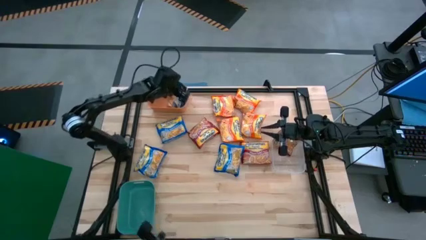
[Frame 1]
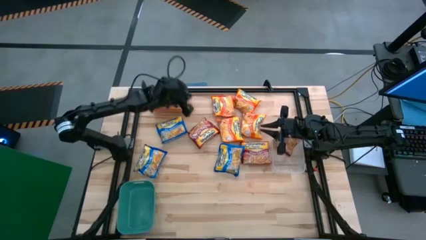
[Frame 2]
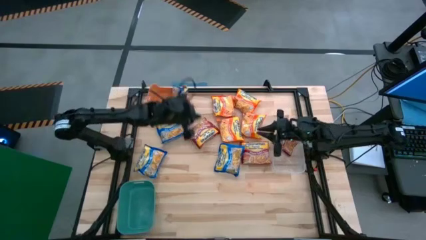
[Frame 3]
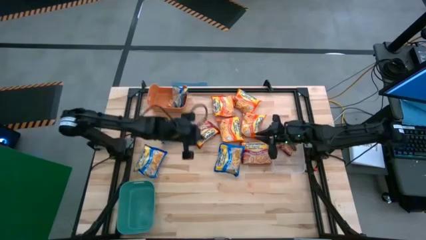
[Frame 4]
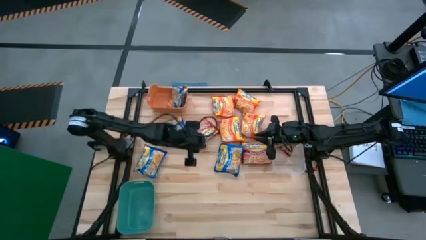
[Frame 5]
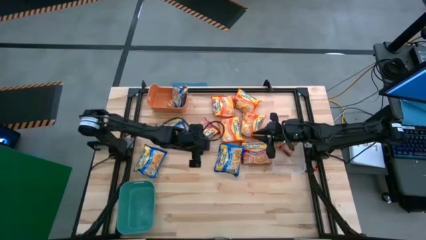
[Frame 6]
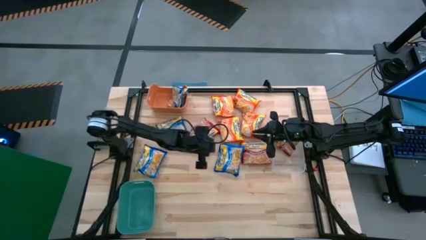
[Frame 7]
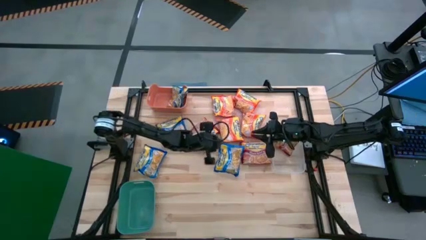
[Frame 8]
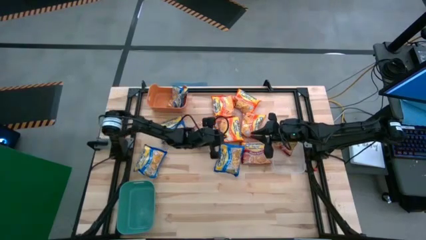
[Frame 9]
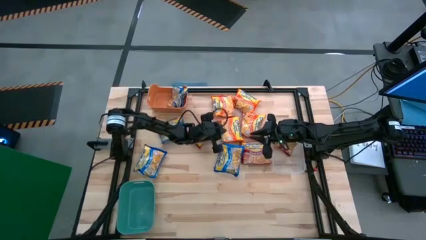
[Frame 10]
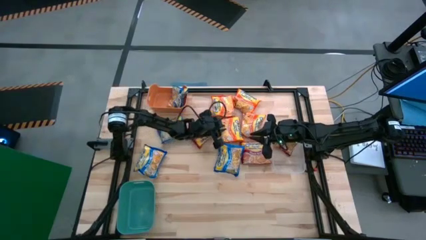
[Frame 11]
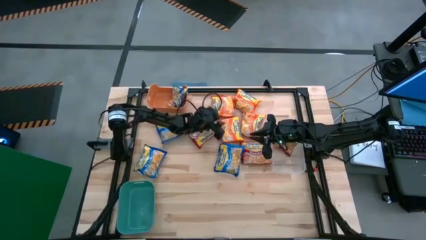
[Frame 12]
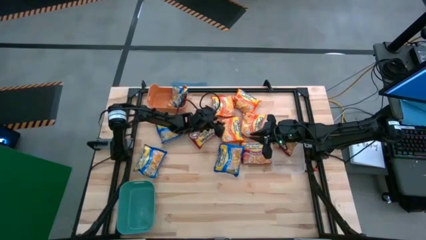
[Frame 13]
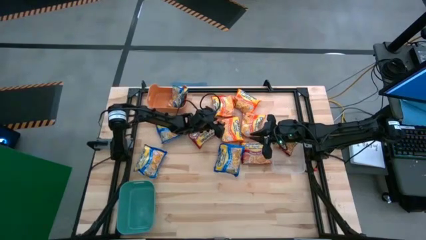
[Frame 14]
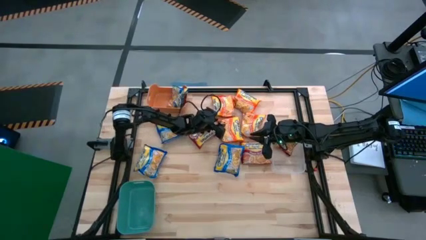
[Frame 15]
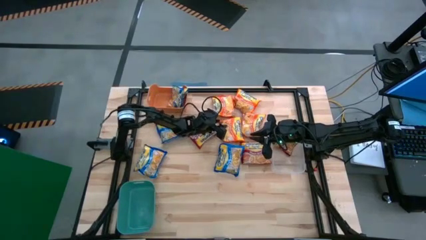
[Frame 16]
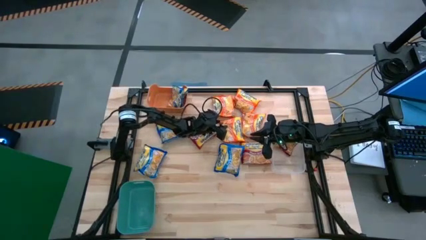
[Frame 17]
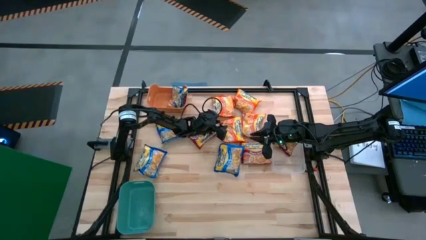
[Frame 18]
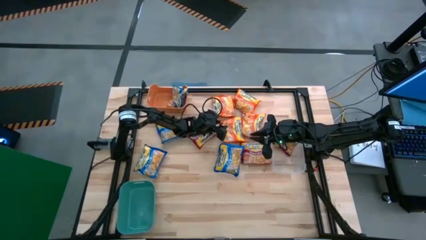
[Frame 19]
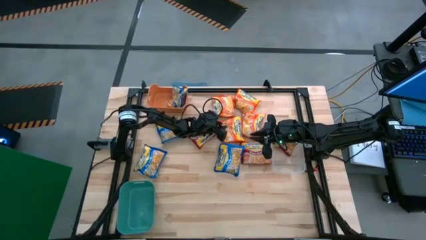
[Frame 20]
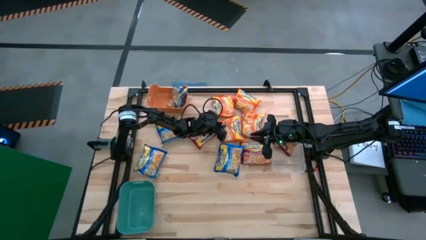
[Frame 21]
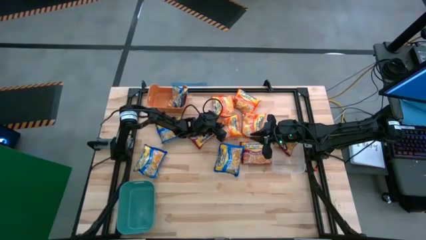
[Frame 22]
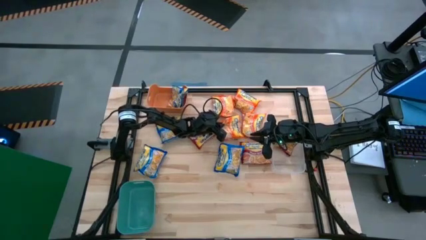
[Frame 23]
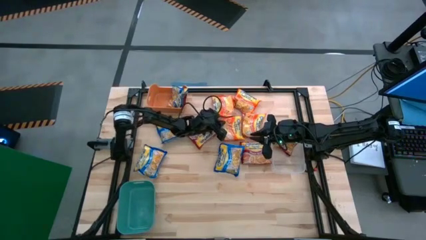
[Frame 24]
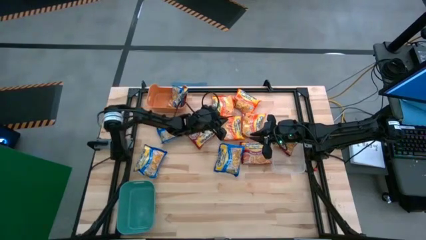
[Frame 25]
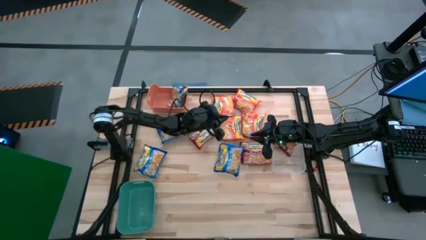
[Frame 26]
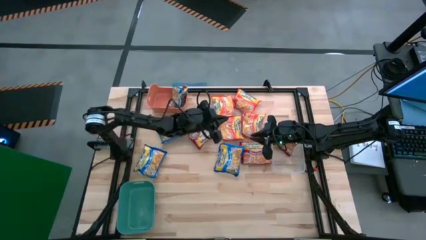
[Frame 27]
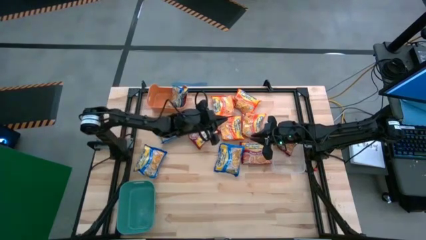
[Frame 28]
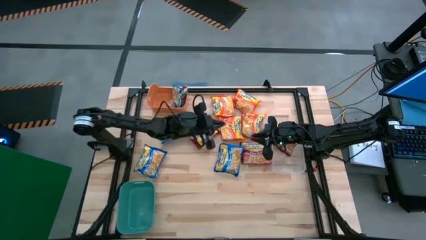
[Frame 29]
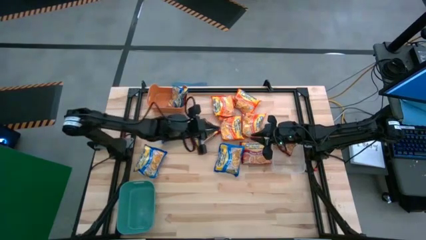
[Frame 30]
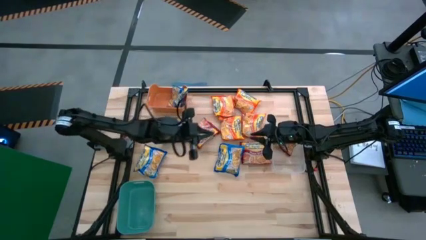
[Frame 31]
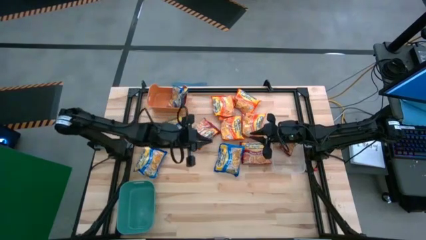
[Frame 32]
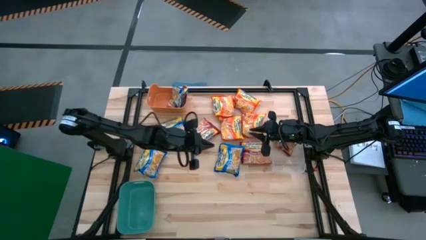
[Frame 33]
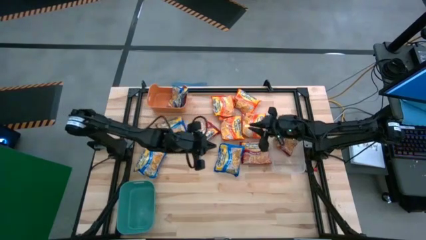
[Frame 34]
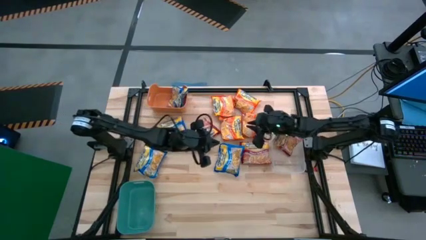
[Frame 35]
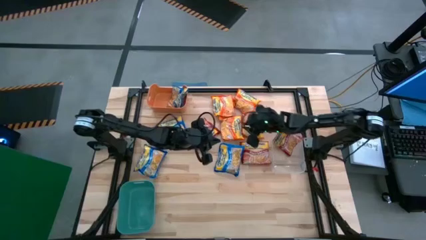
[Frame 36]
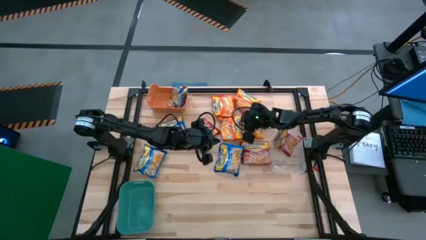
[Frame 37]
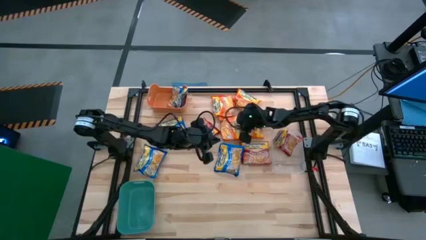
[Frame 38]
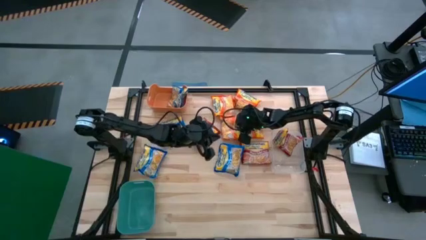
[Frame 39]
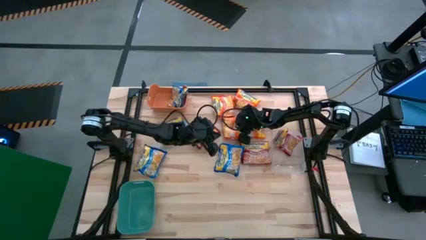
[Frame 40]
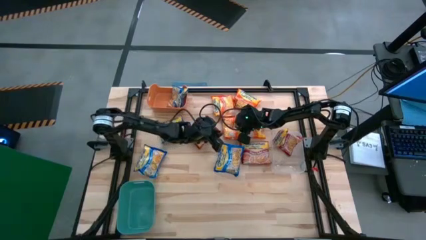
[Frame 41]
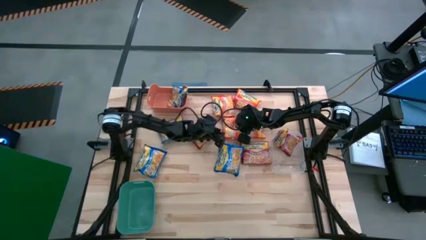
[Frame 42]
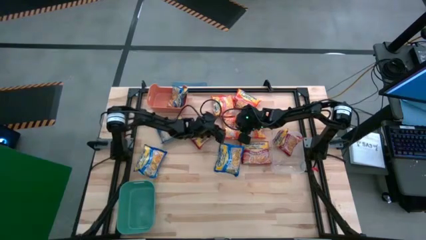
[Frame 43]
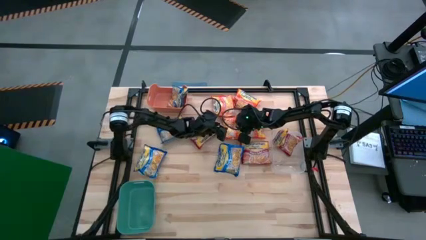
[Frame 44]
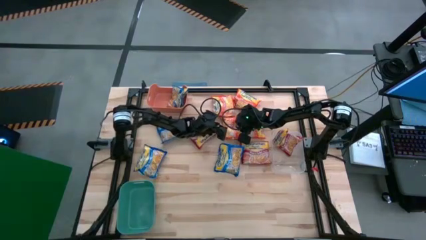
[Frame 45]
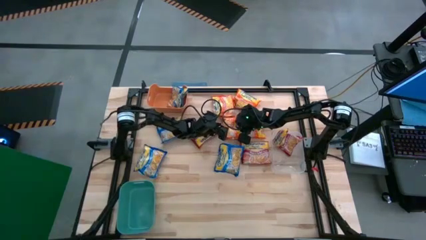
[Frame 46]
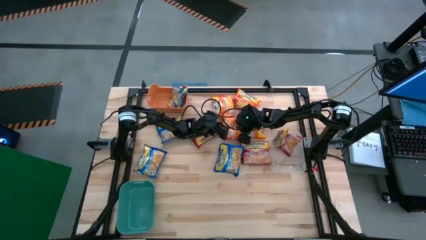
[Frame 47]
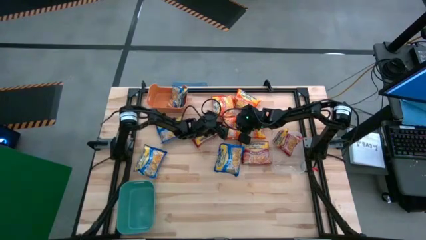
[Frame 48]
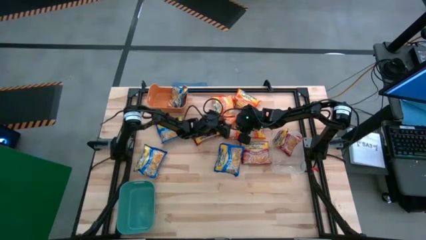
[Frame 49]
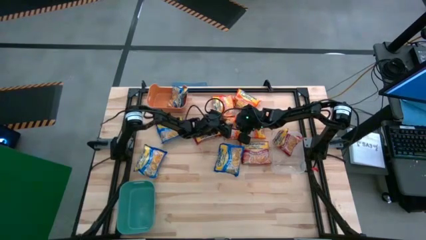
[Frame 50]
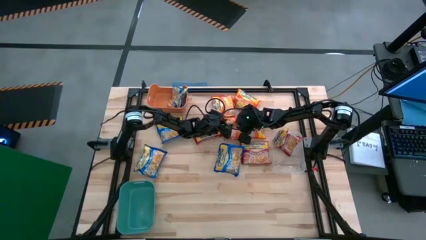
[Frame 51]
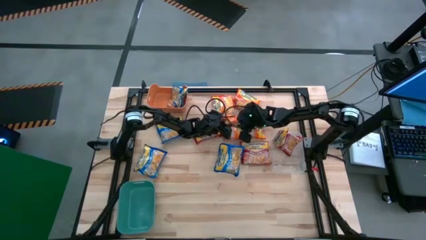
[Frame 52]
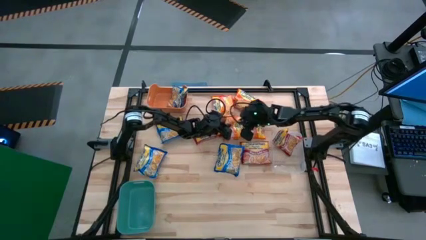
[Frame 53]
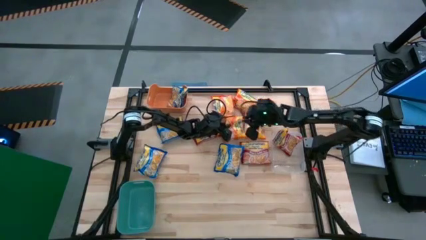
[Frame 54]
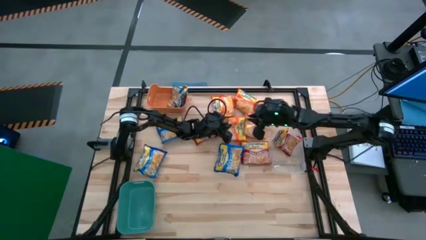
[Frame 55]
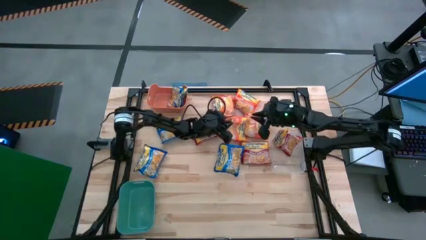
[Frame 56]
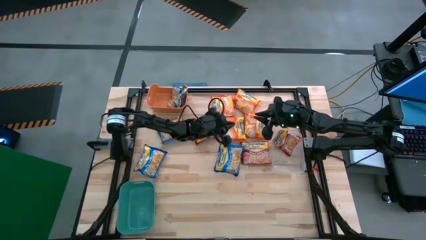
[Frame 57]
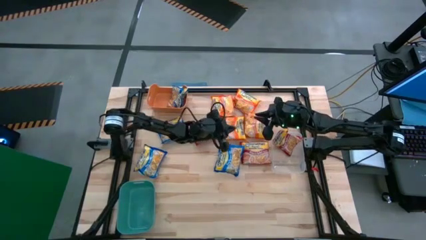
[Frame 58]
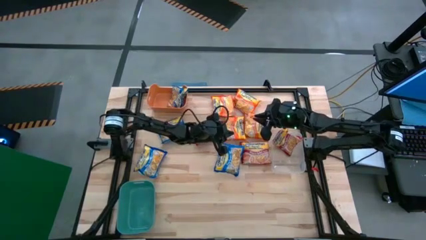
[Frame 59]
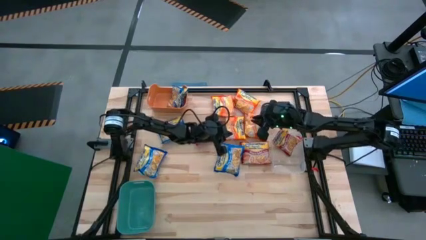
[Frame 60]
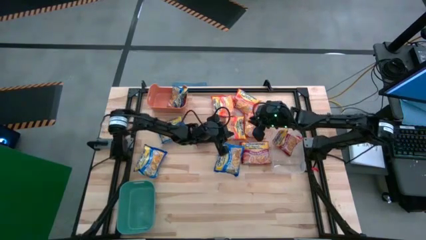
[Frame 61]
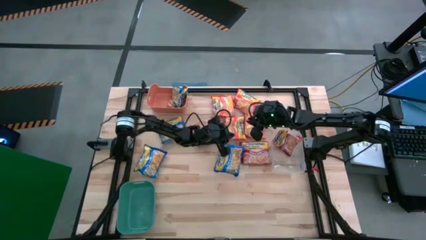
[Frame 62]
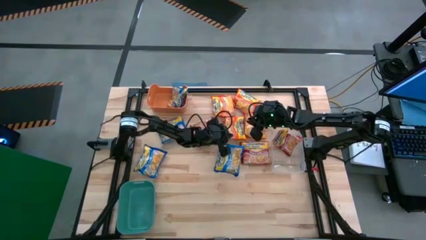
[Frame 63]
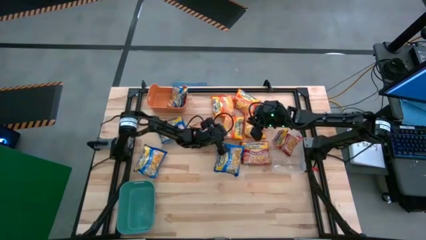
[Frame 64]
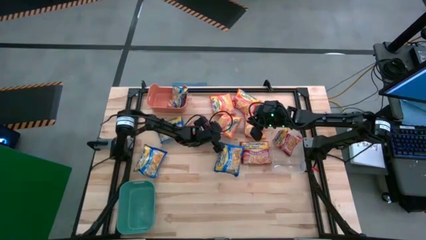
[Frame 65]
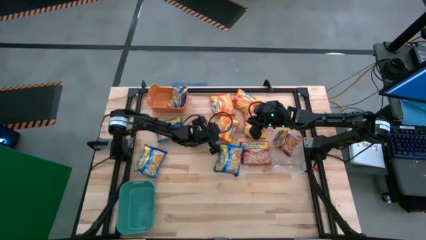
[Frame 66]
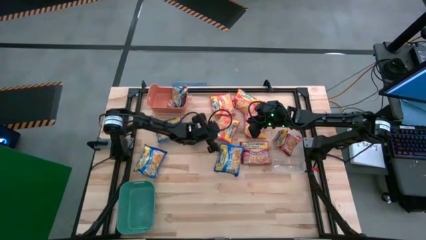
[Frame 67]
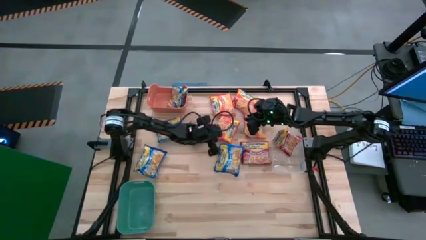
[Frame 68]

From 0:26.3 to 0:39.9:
Task: Sort Maruchan noodles
Put the orange noodle pack into the green bin

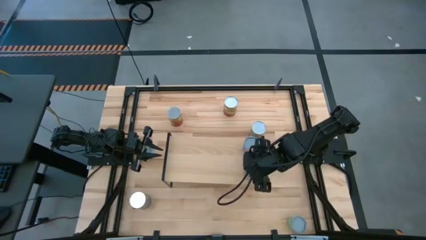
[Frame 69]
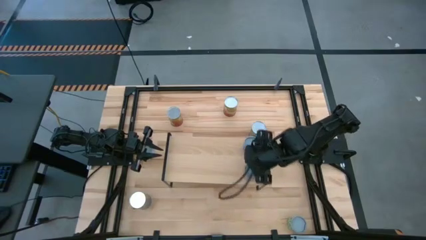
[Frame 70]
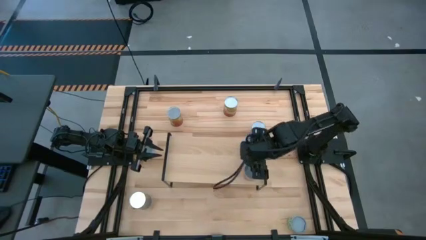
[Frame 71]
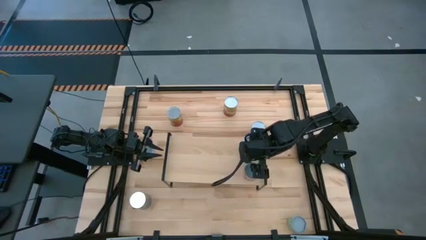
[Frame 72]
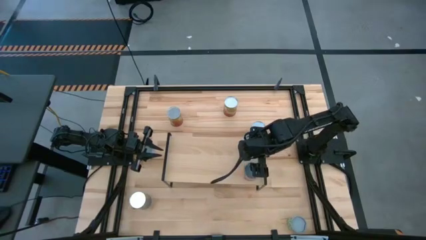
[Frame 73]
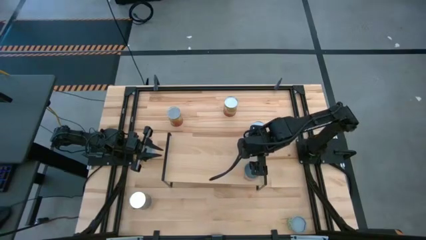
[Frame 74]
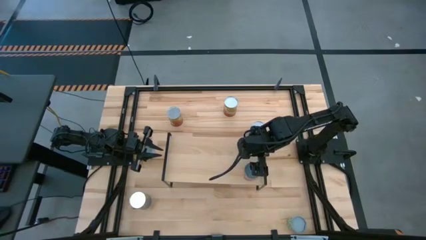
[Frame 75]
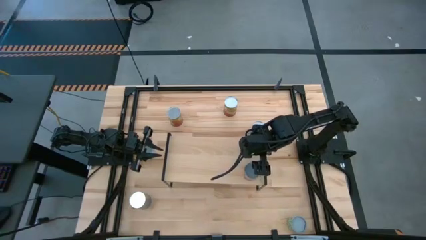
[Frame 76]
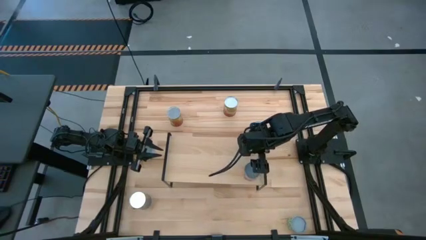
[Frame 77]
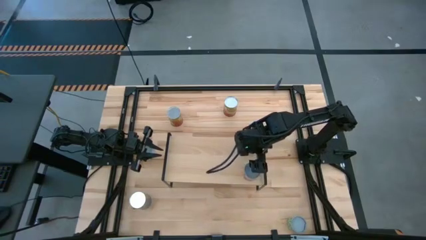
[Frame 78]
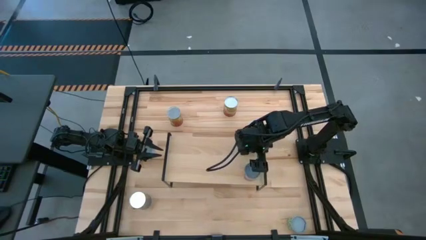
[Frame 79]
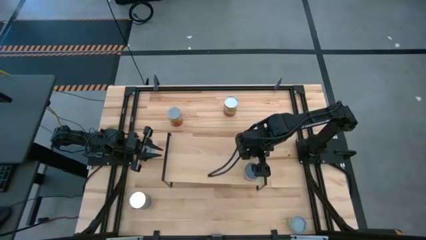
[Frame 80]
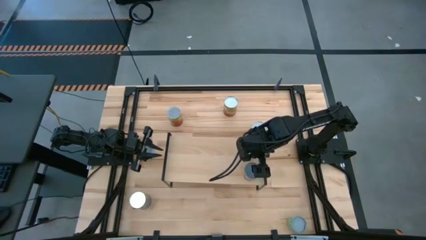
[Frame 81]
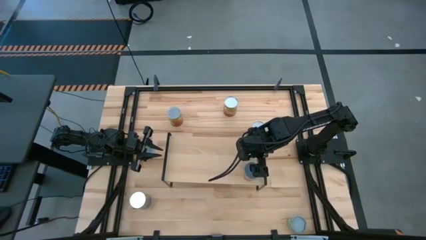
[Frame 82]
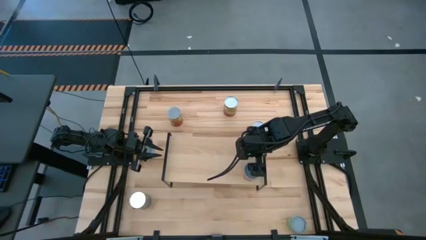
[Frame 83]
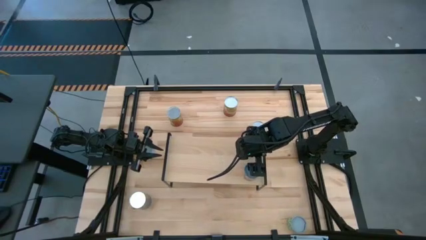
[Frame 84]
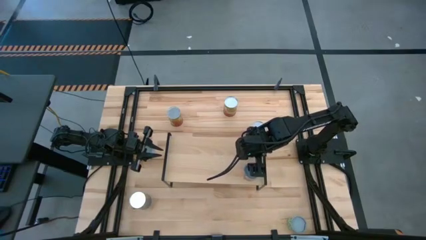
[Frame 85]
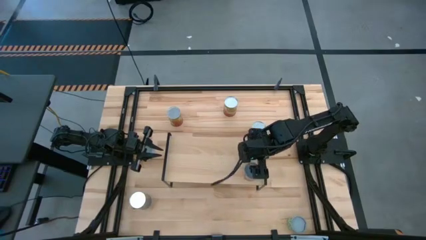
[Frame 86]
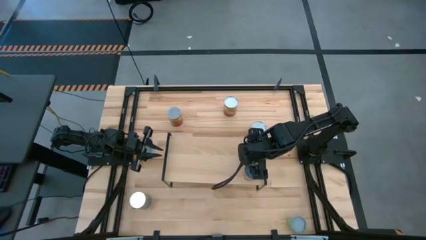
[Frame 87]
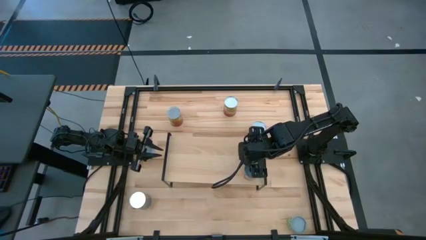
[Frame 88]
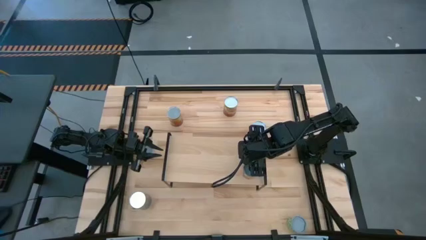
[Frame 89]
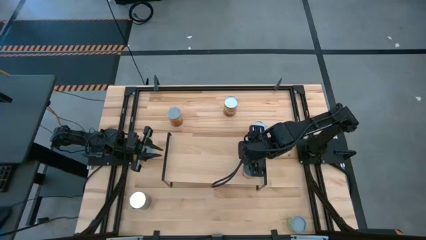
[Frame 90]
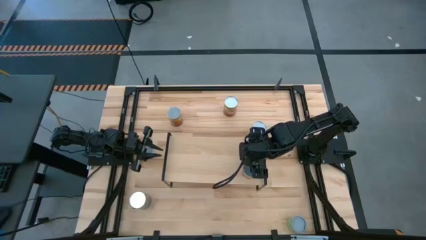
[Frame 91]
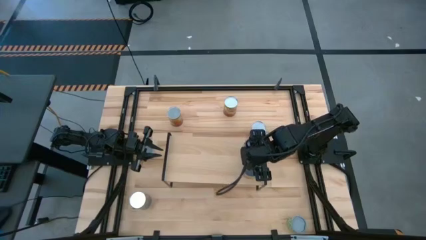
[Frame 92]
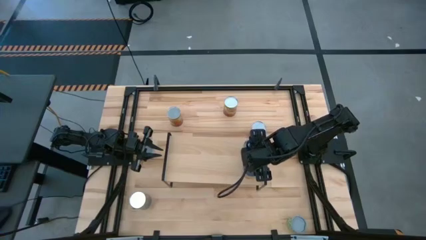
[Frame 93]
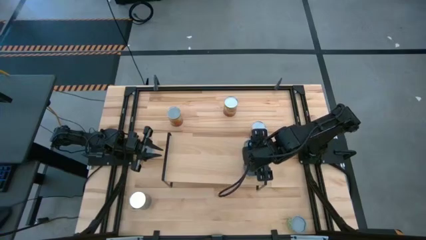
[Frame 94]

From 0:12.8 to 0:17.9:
Task: Pick and place cans onto a shelf
Adjust the small cans on the shelf
